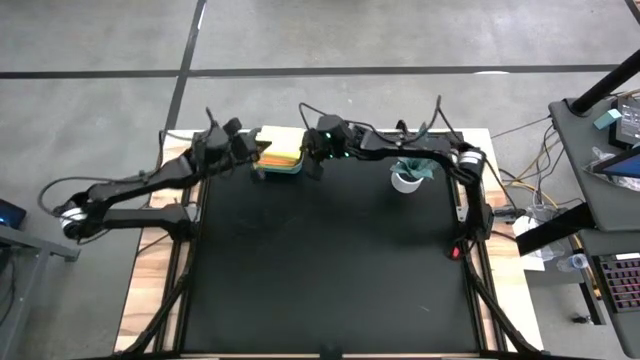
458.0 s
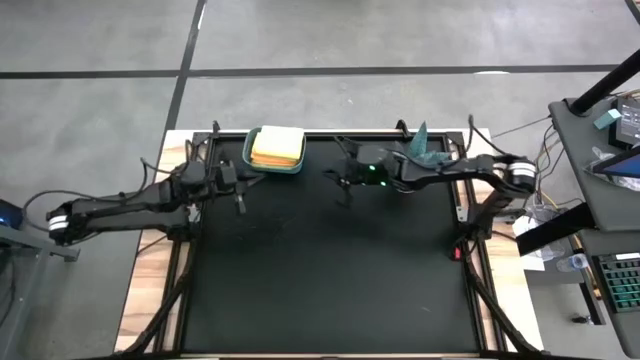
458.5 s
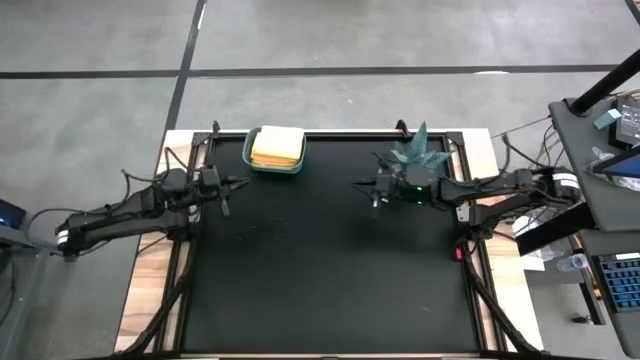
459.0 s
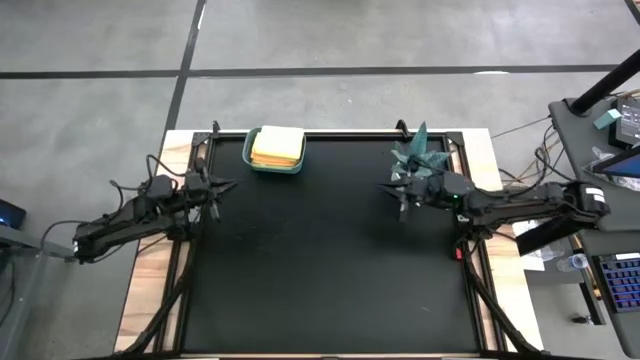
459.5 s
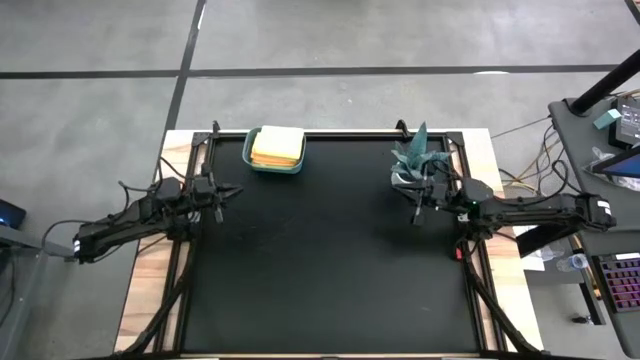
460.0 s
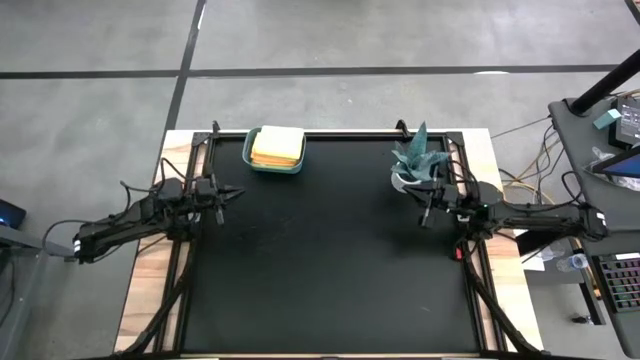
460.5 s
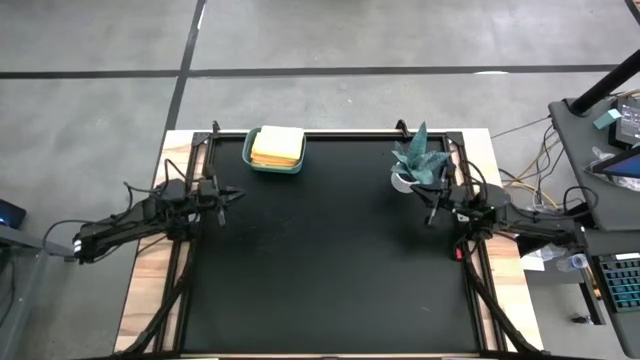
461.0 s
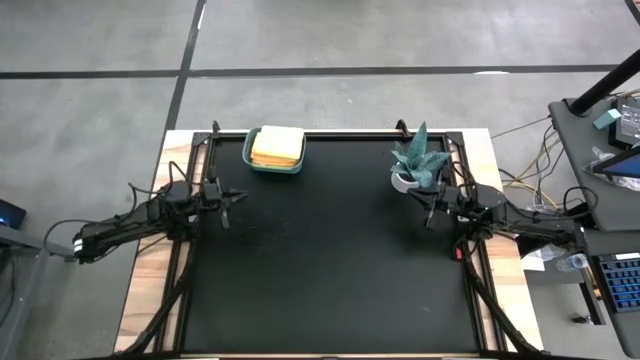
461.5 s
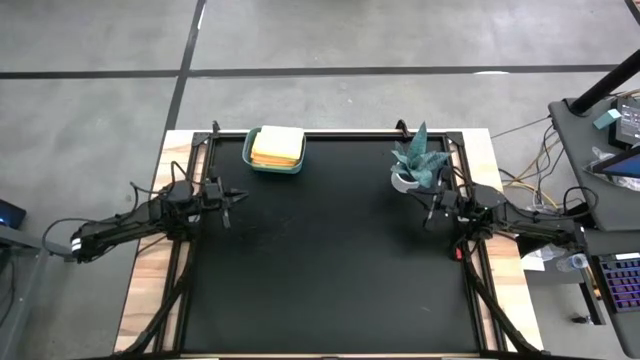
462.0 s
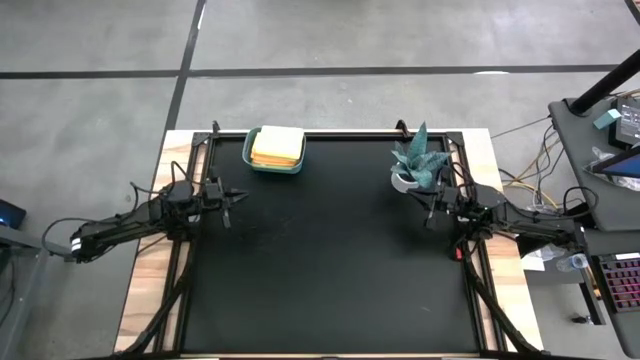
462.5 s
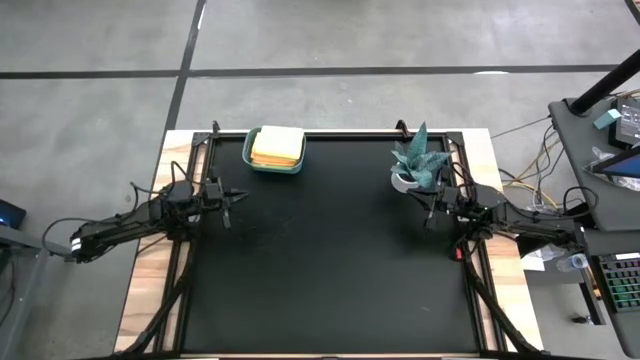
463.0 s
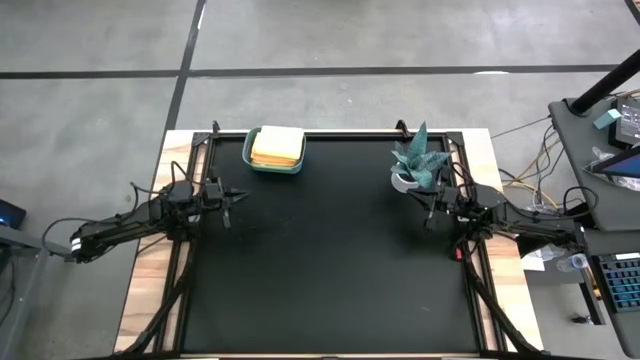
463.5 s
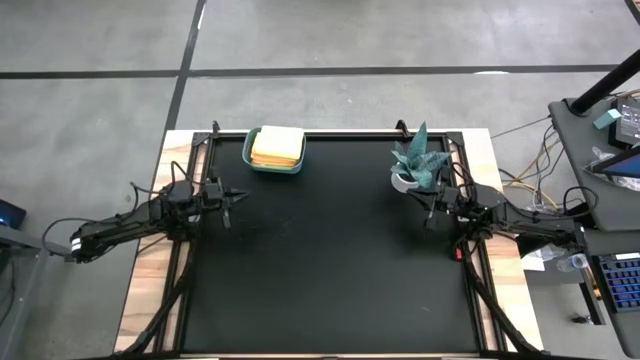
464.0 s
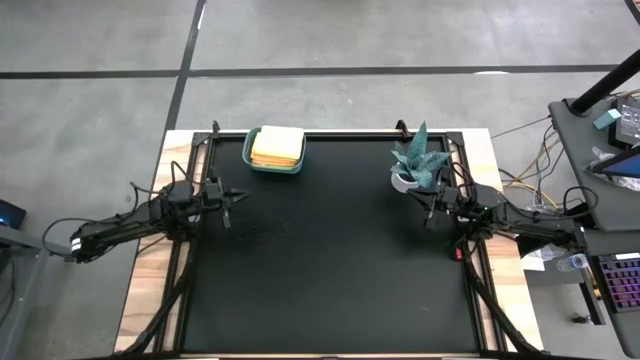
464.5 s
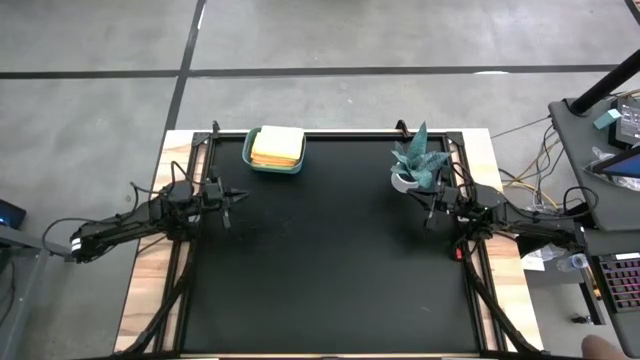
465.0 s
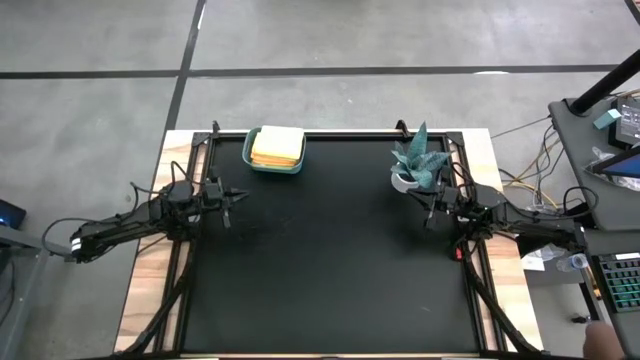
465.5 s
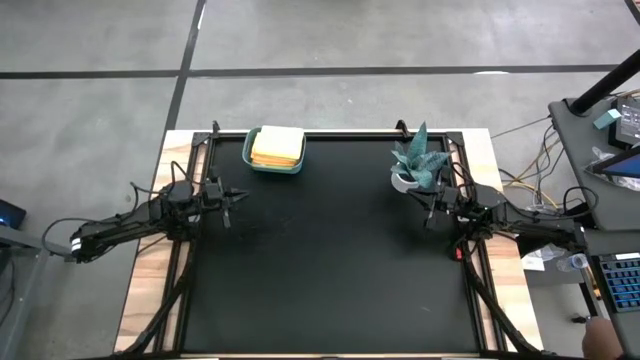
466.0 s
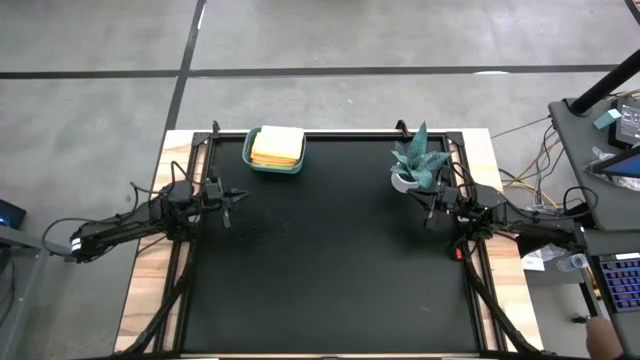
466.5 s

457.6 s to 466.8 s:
Task: Fold microfiber towels
Return to Home Position

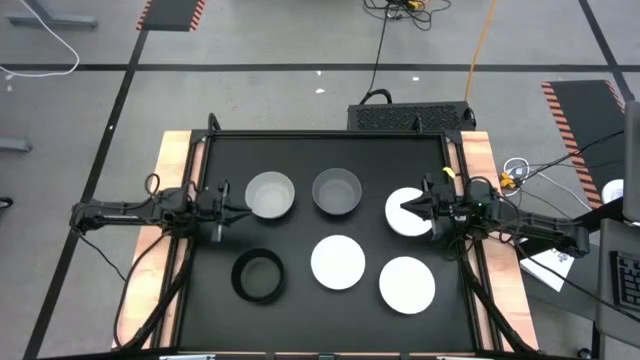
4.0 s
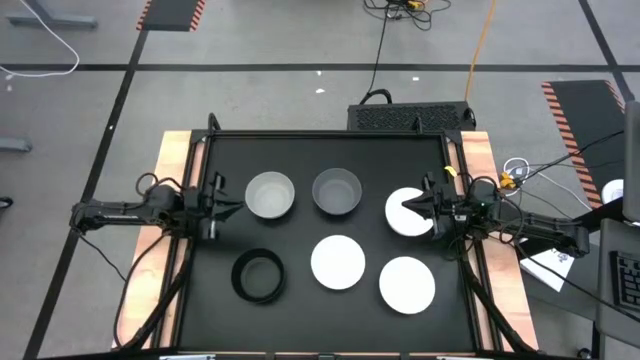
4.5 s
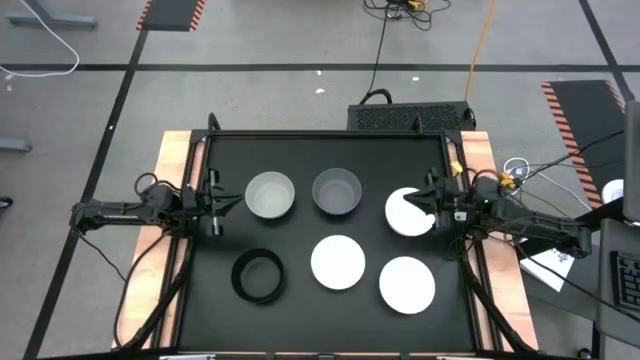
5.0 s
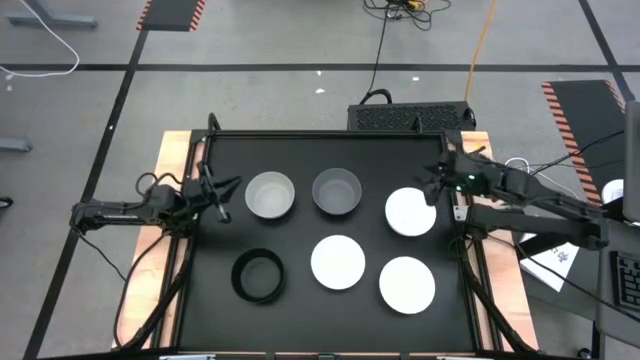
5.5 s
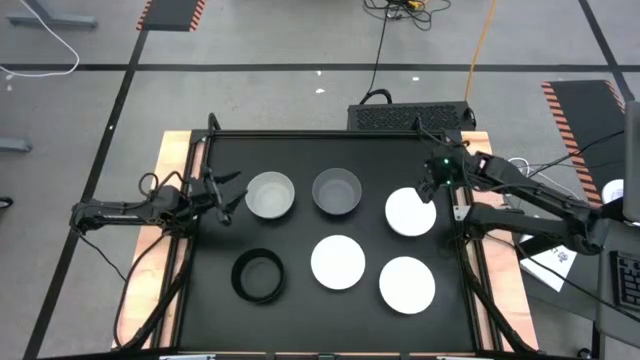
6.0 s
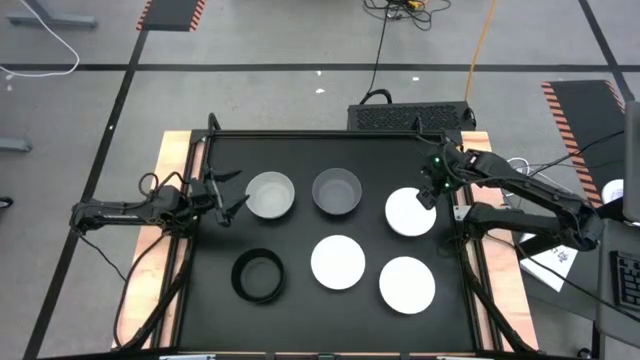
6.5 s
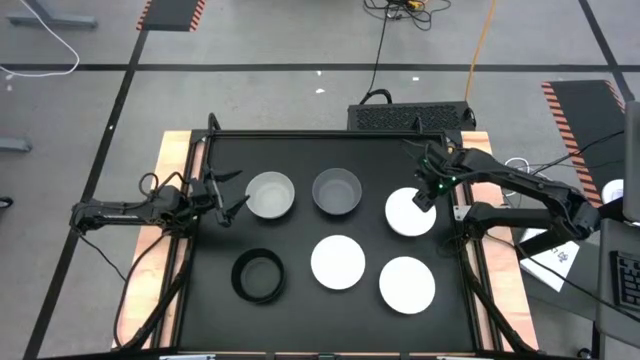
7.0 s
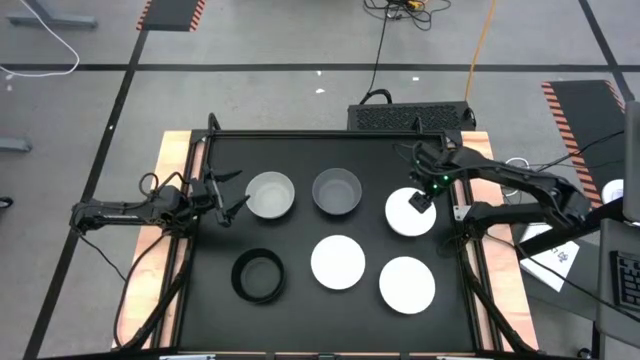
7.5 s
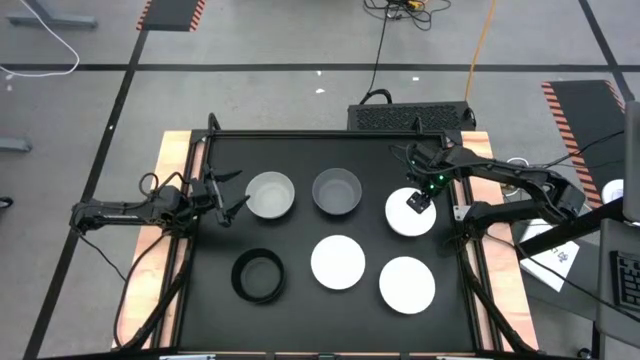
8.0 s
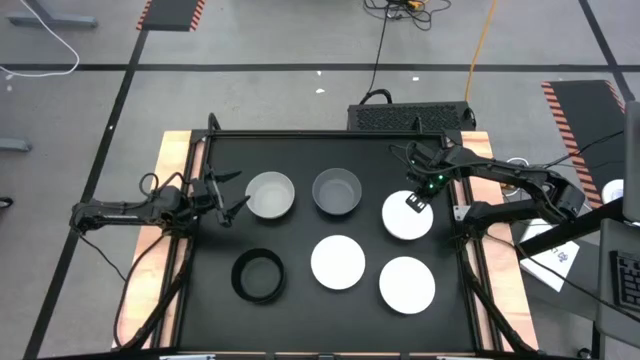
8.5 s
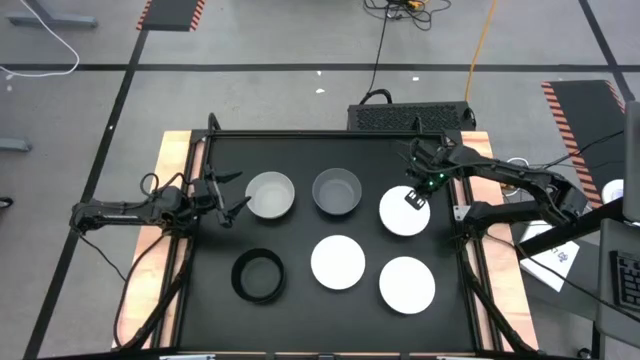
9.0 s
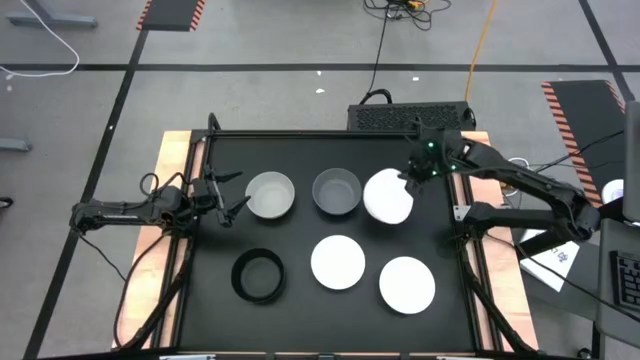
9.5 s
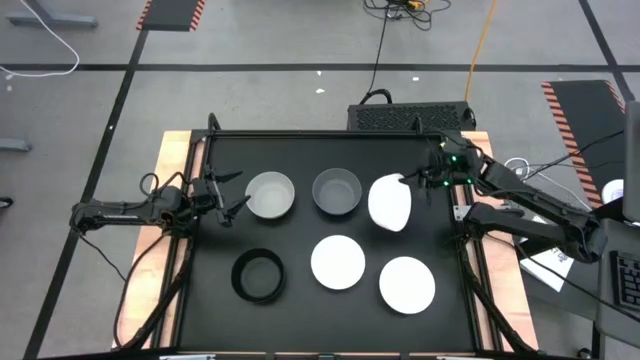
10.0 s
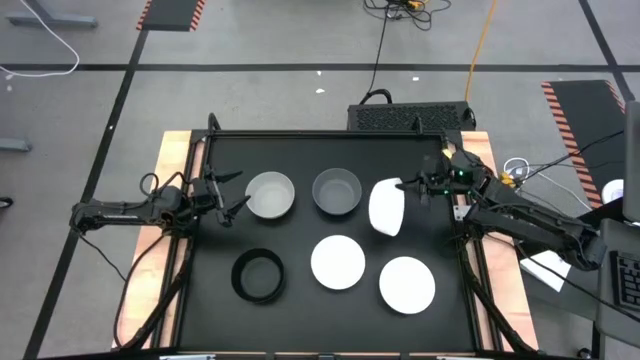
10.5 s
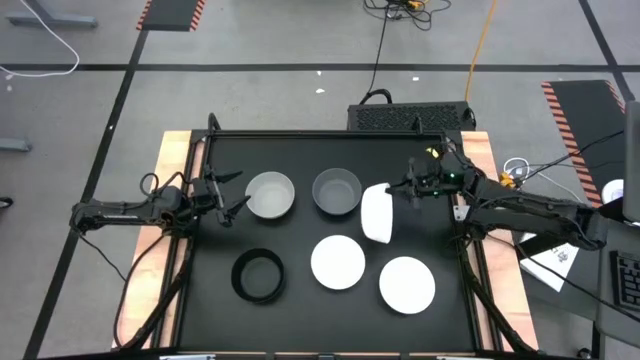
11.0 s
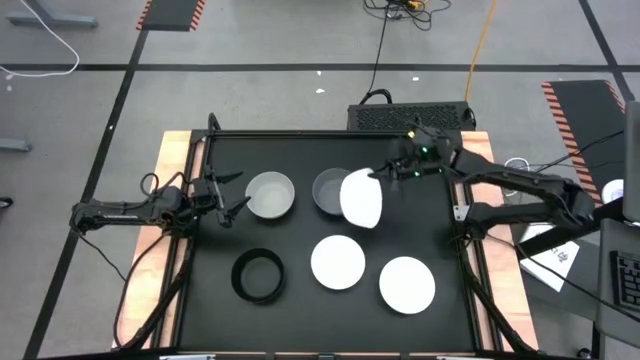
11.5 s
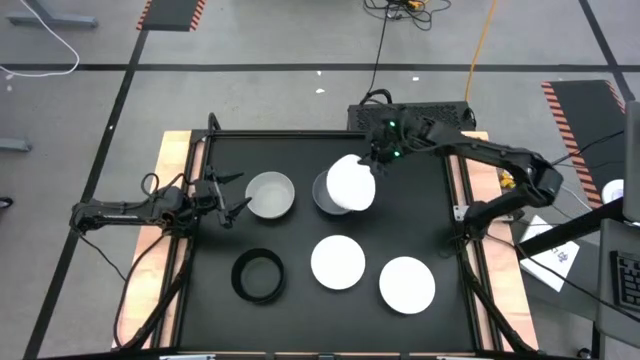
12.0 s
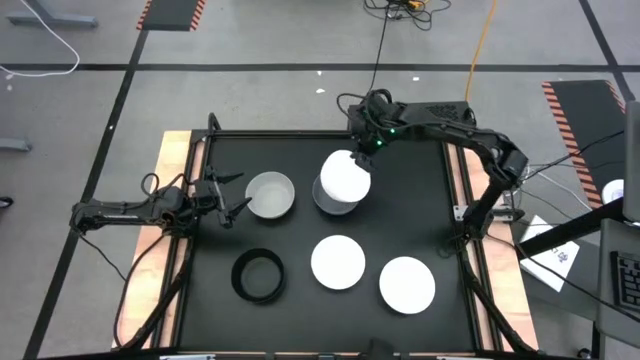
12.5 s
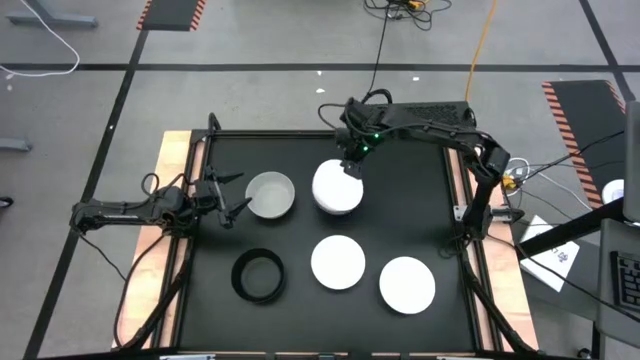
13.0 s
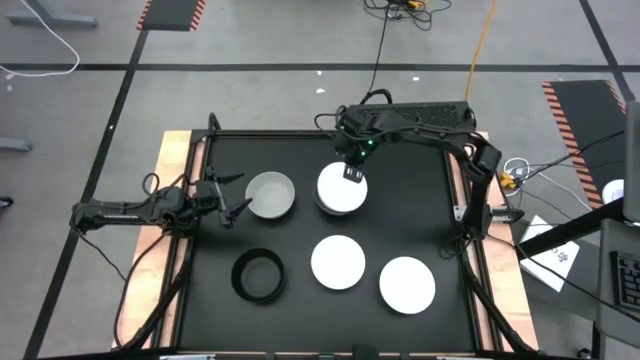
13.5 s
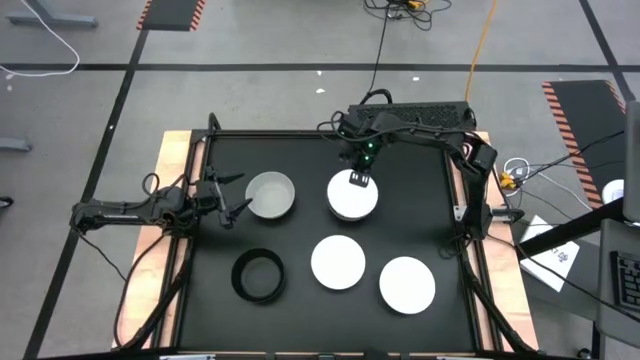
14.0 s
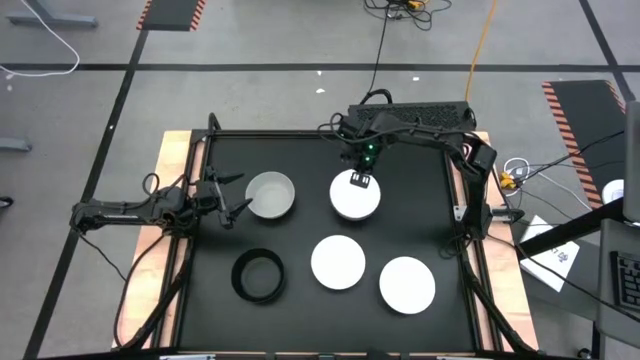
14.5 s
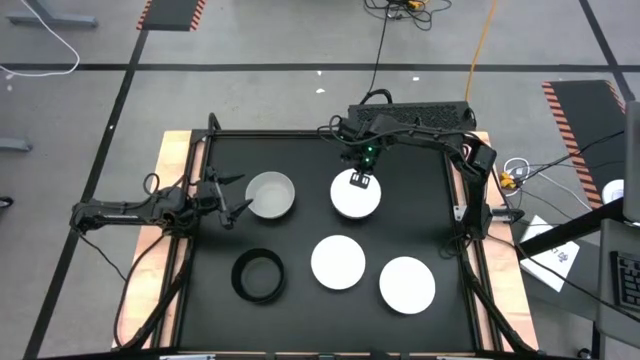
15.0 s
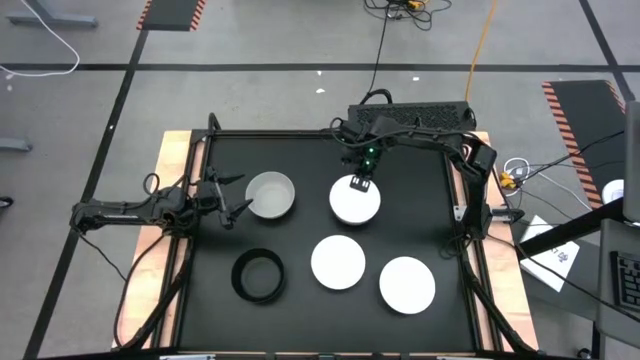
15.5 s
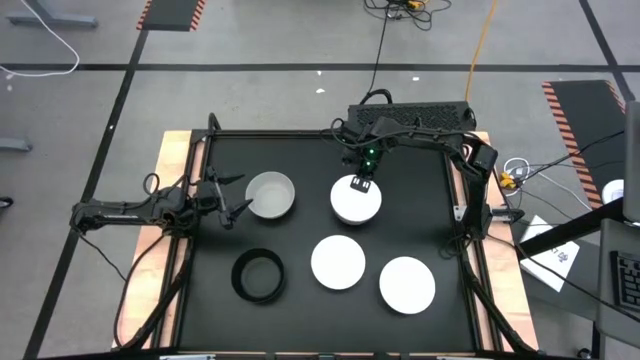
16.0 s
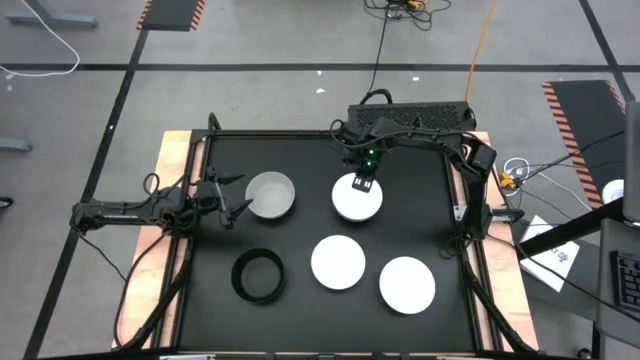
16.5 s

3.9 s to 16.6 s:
Task: Nest bowls inside each other
Stack the top right white bowl on top of the dark gray bowl
